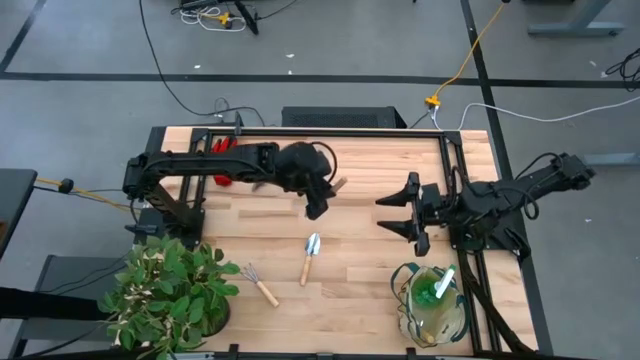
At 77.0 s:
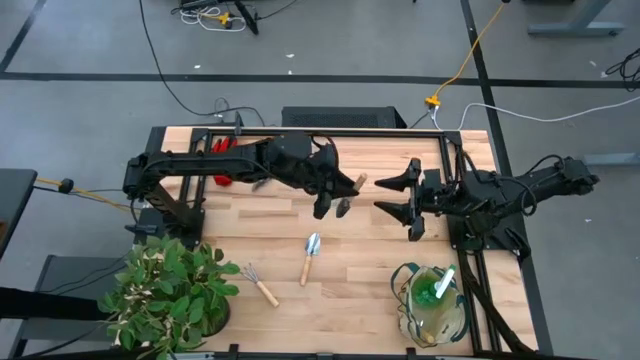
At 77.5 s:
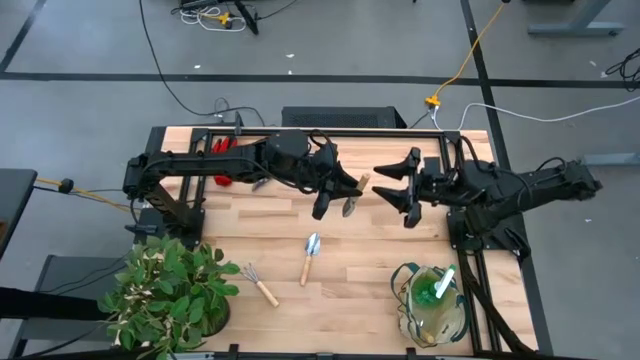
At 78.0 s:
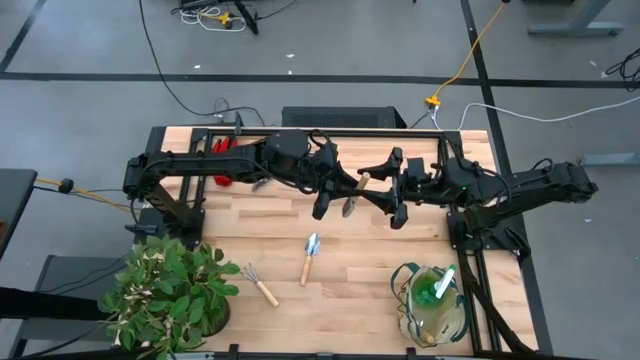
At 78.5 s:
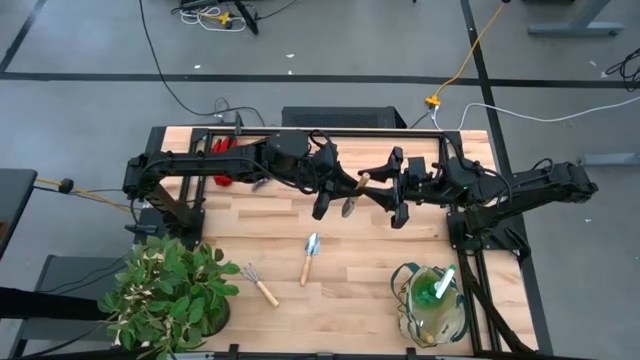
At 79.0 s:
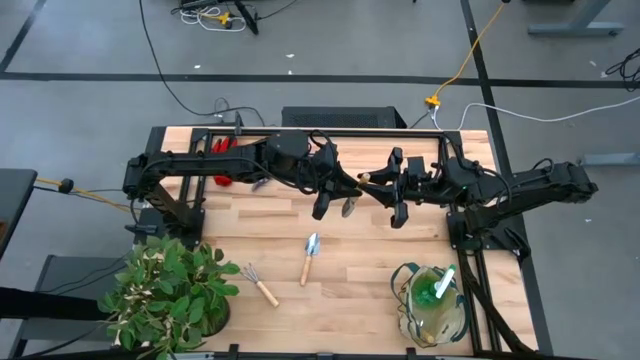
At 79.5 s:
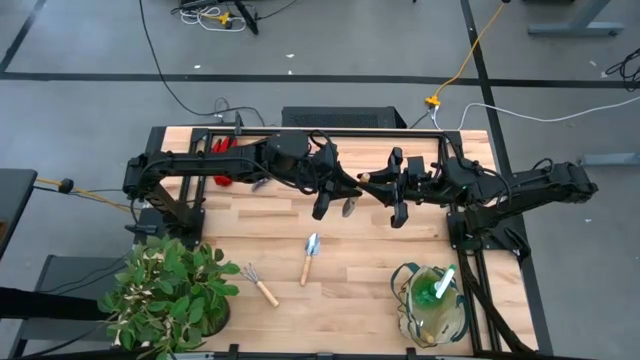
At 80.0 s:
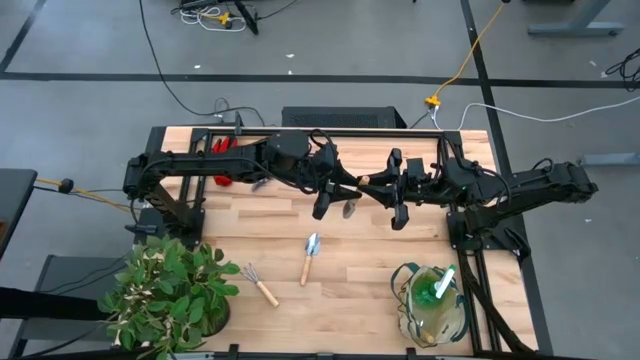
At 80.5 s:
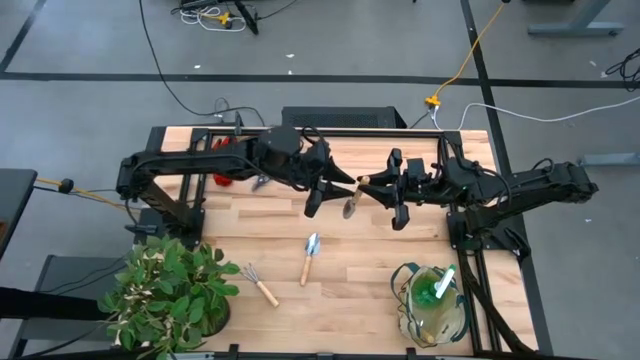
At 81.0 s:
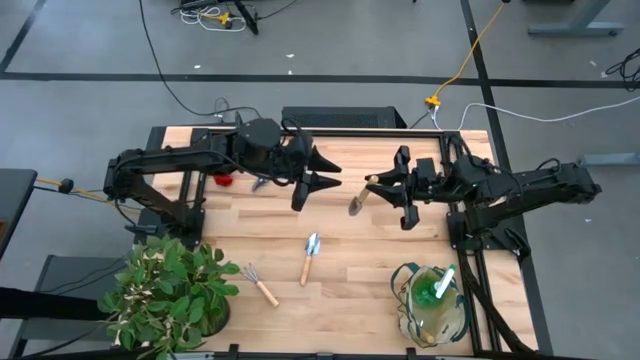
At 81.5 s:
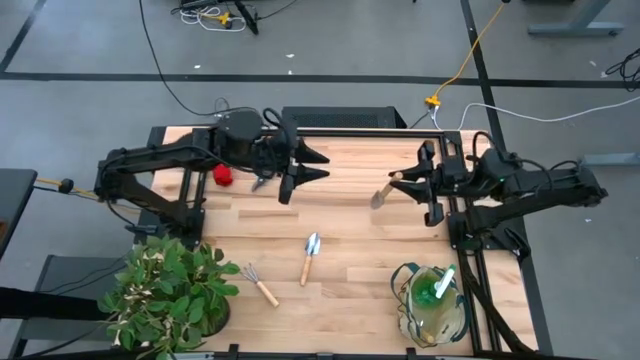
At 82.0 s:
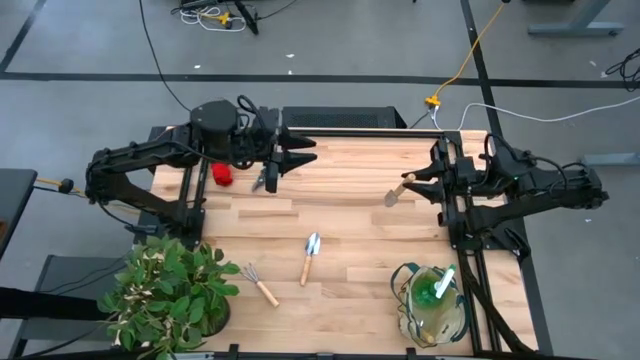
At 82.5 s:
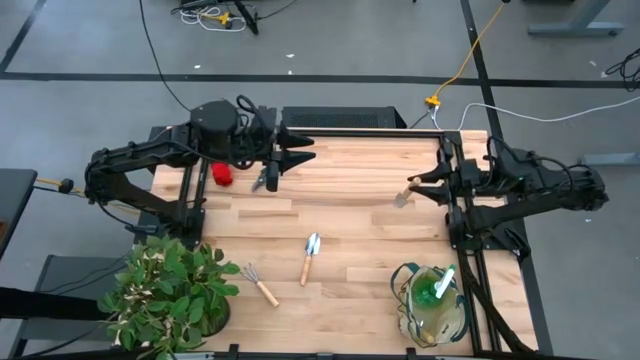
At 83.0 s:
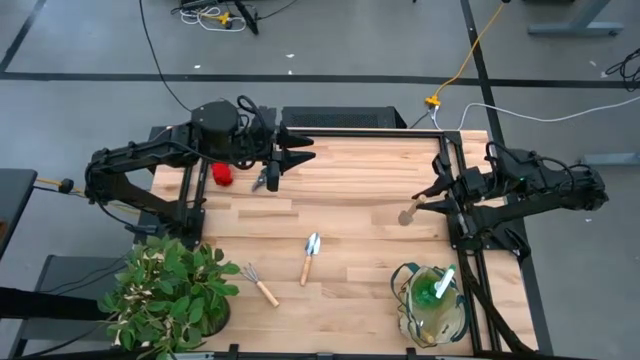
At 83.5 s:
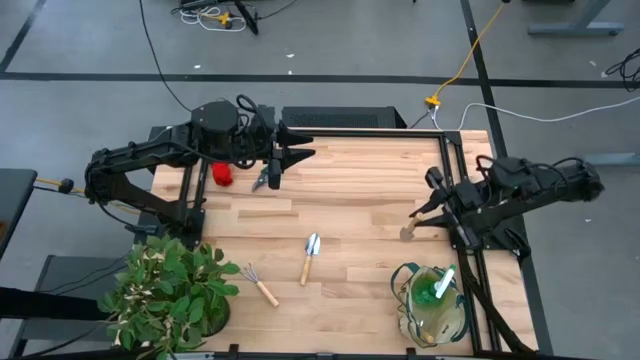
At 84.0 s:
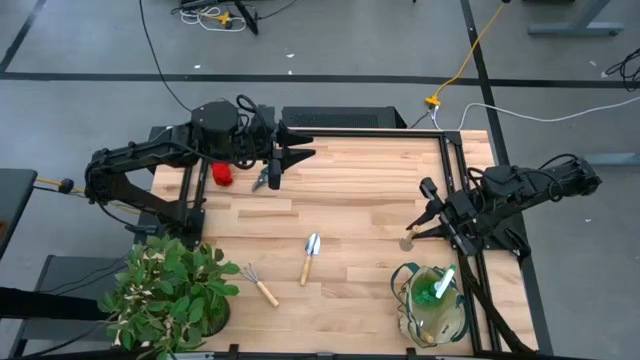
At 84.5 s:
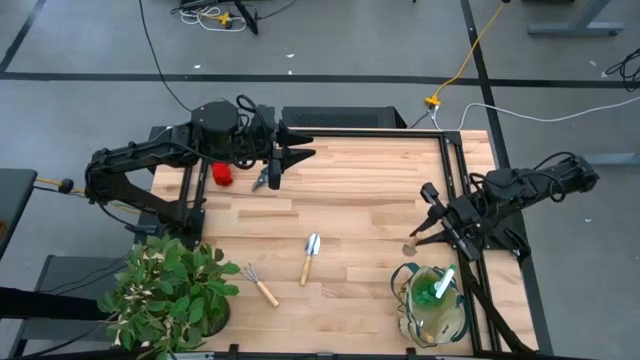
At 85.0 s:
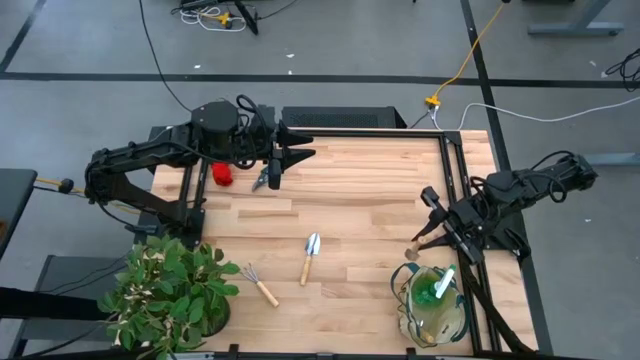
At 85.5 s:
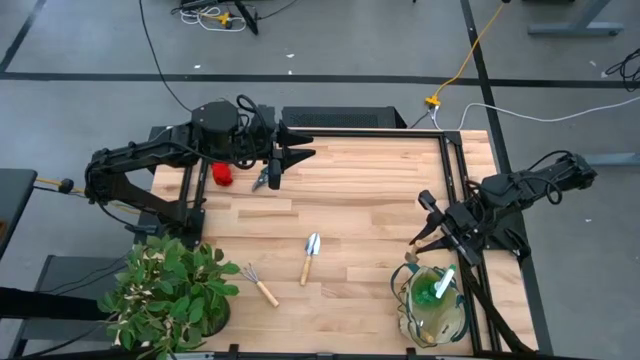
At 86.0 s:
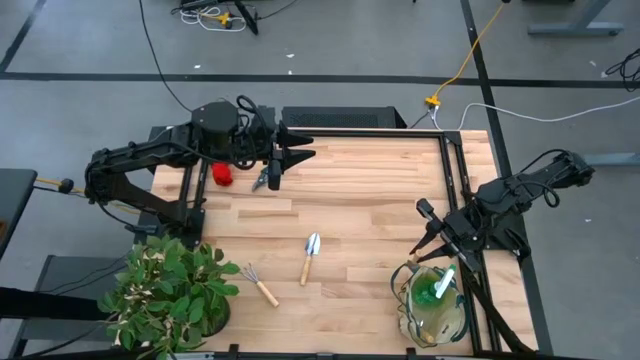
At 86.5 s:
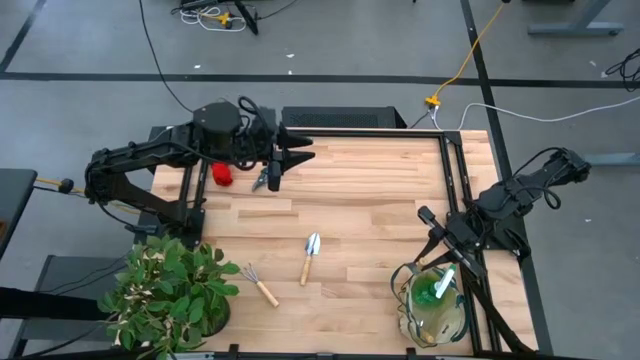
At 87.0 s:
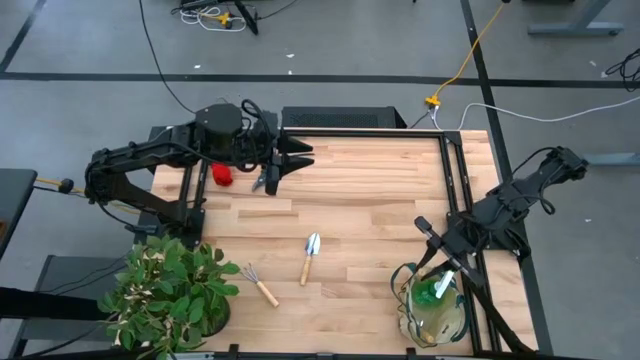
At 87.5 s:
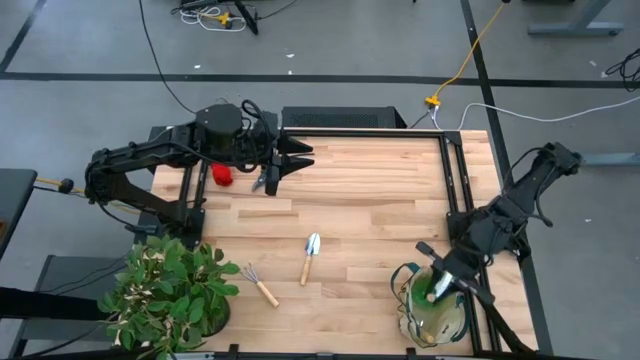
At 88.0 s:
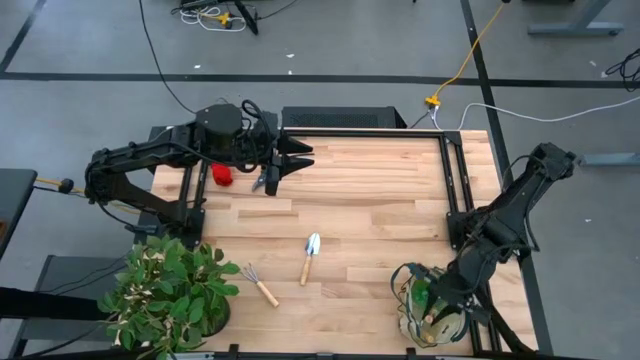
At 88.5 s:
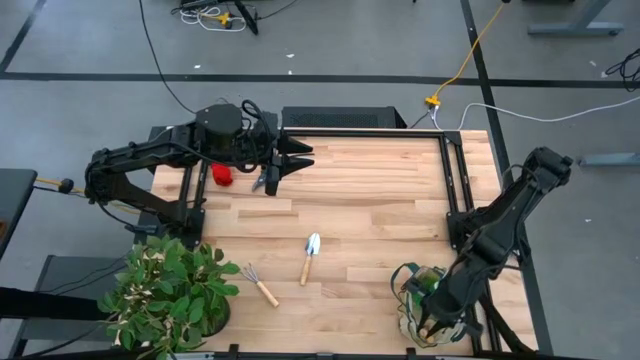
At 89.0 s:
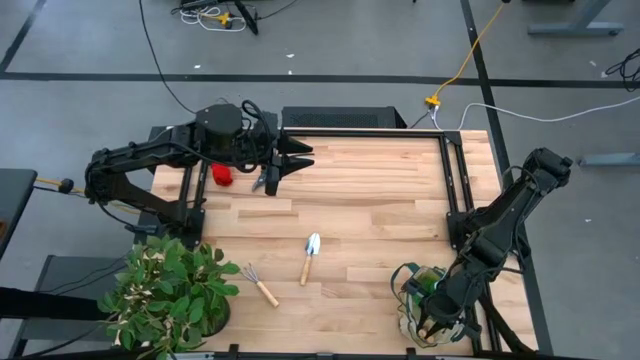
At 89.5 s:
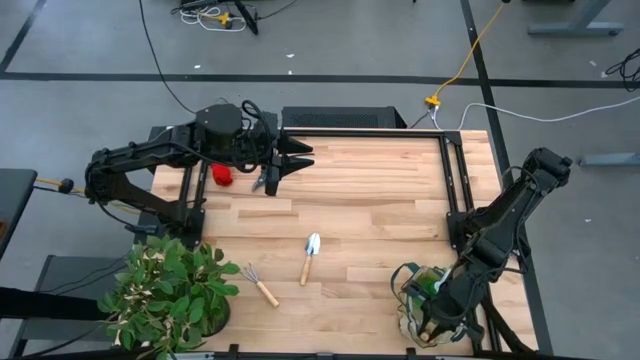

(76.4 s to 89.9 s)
Task: Pick & Place Garden tools in Gardening bag
Put the left brown trowel into the white gardening bag

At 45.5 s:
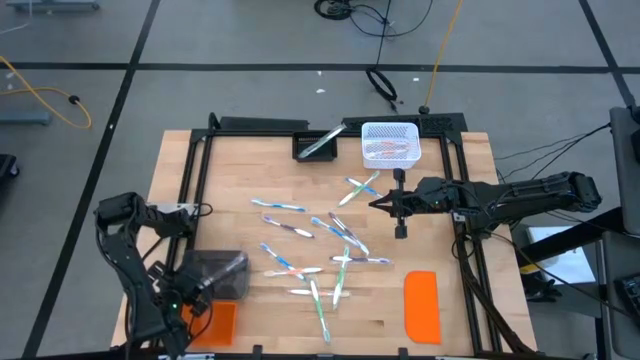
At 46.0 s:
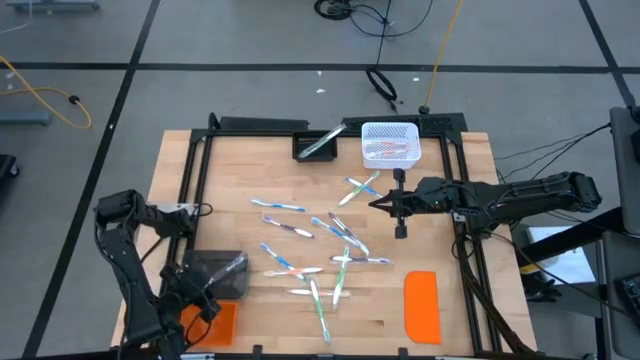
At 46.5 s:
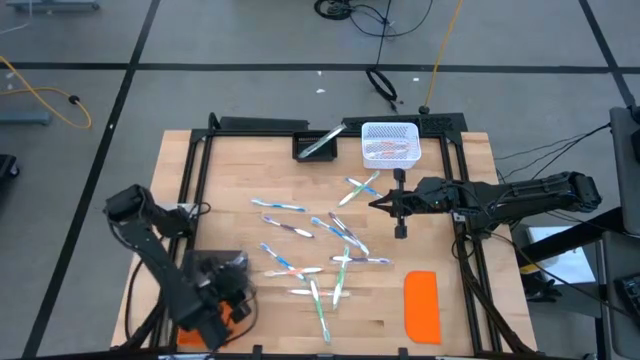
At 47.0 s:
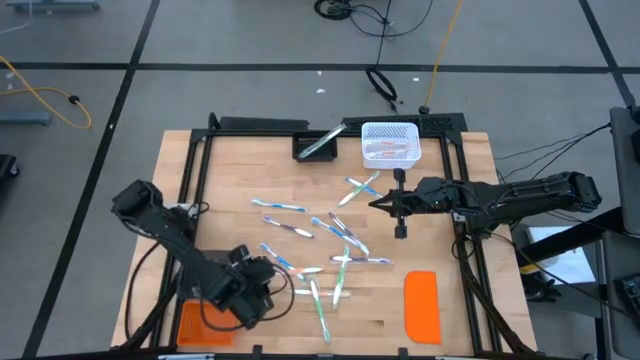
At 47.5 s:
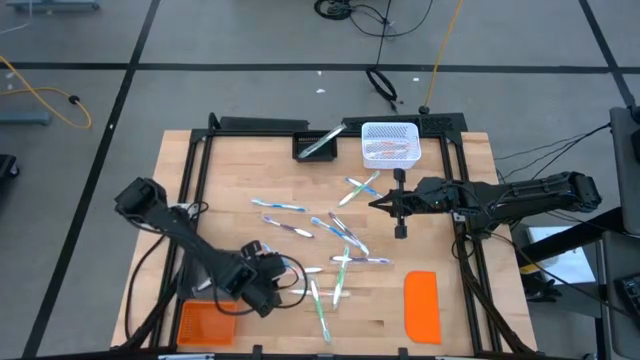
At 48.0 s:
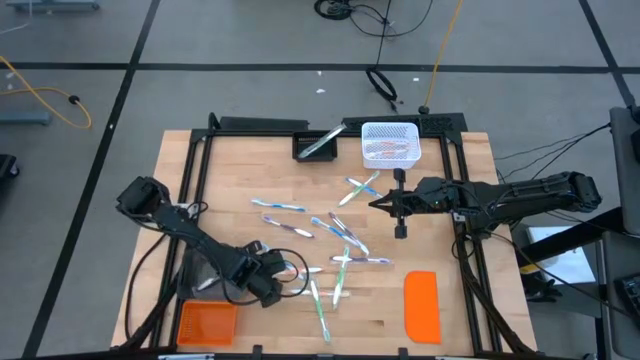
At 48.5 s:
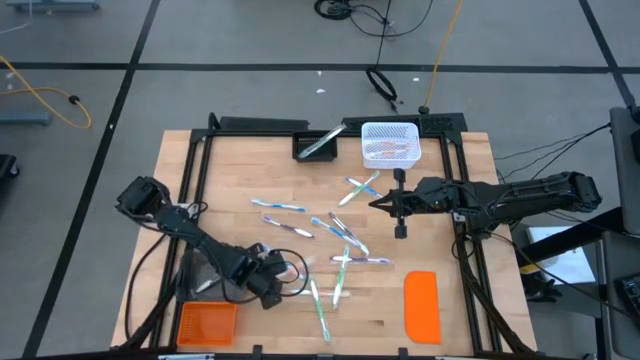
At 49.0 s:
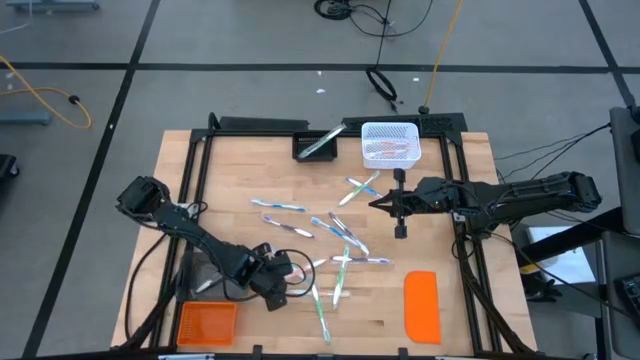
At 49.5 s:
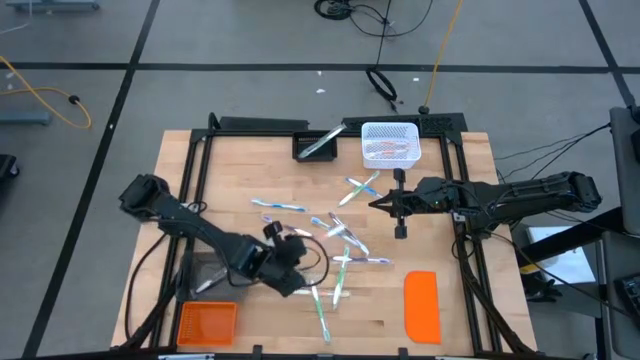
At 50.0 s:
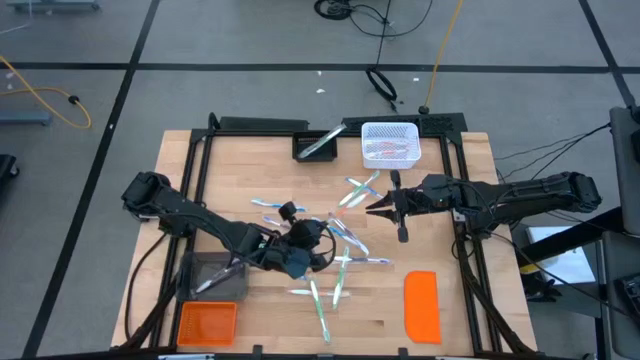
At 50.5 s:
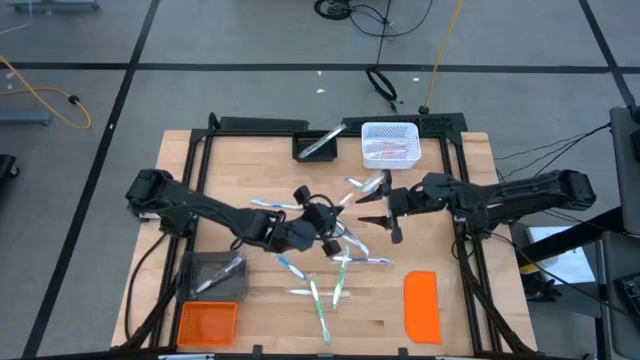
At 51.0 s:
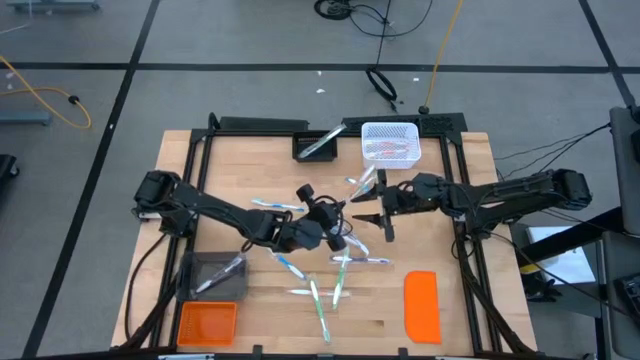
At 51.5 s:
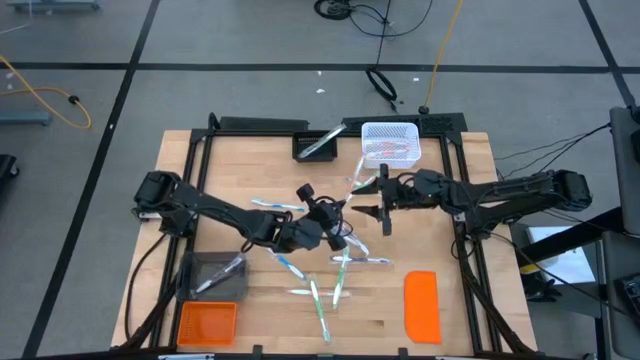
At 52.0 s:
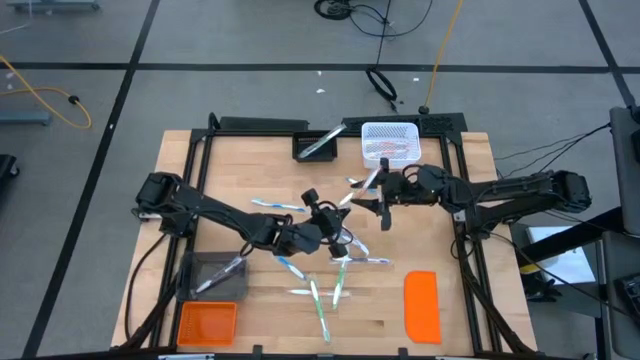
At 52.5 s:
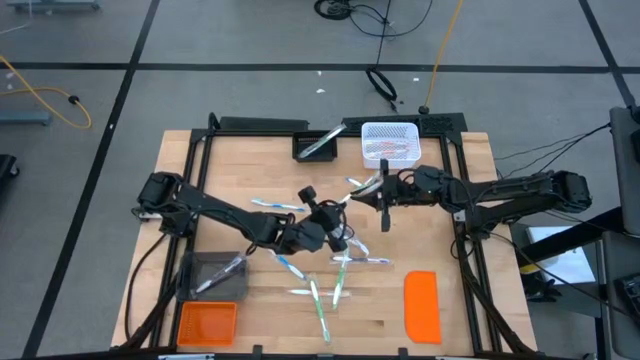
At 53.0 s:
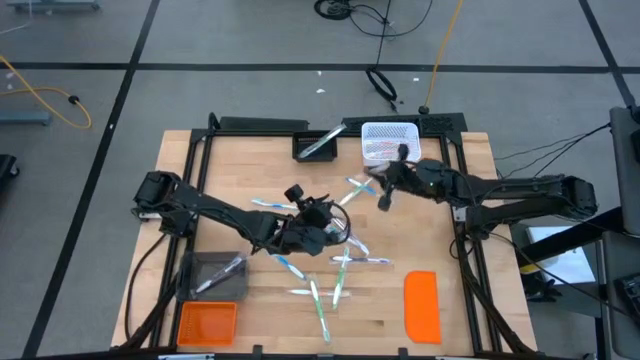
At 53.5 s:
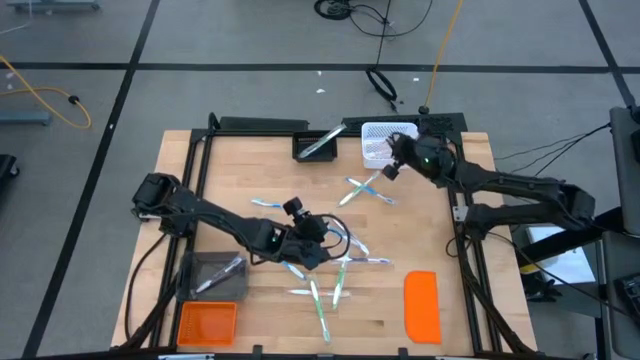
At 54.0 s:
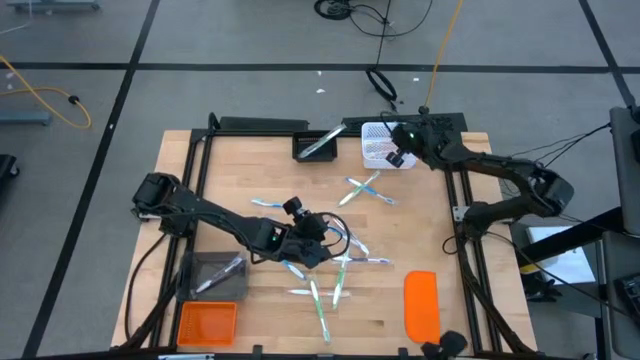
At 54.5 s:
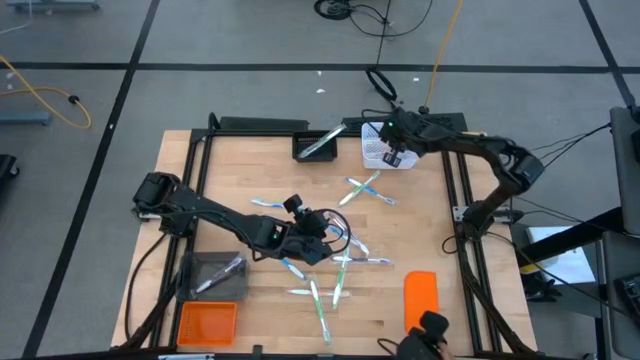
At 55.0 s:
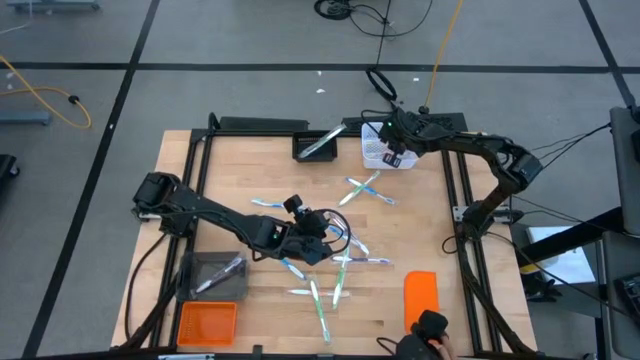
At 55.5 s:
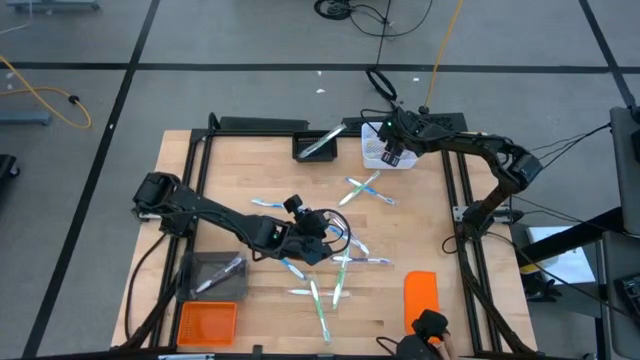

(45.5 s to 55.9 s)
Task: Pick & Place Toothbrushes
Put the orange toothbrush into the white bin
